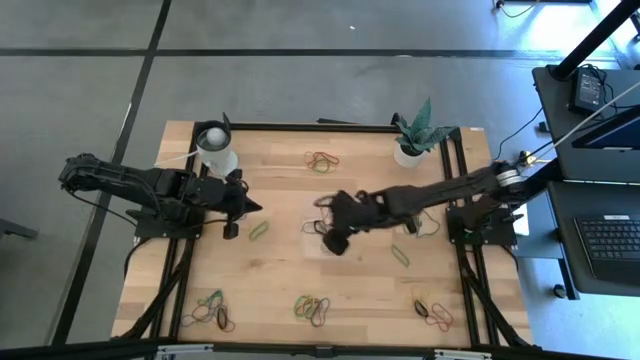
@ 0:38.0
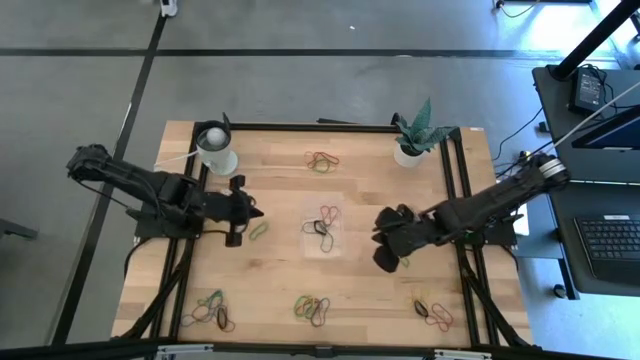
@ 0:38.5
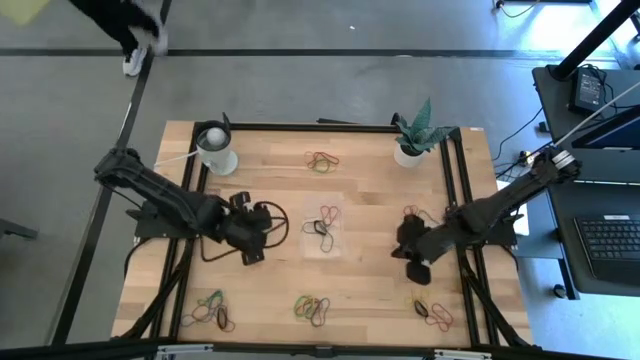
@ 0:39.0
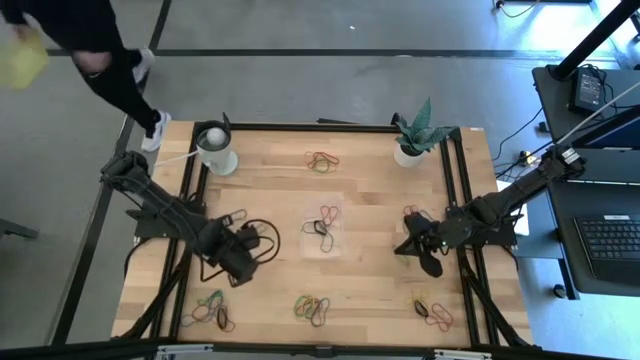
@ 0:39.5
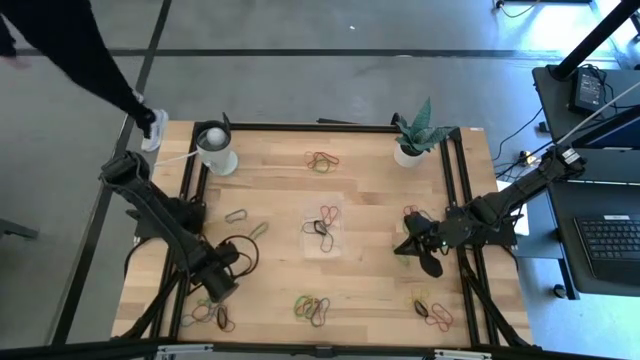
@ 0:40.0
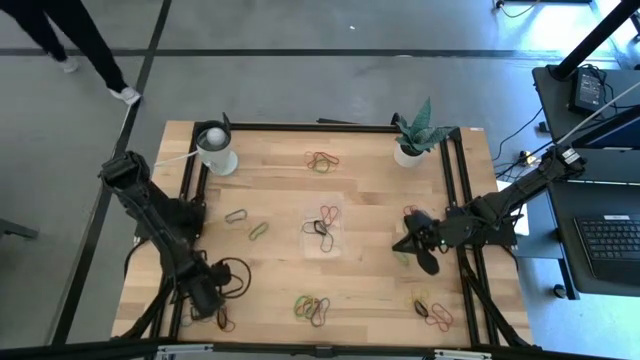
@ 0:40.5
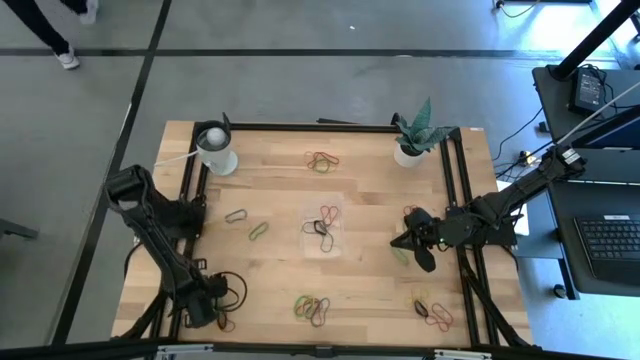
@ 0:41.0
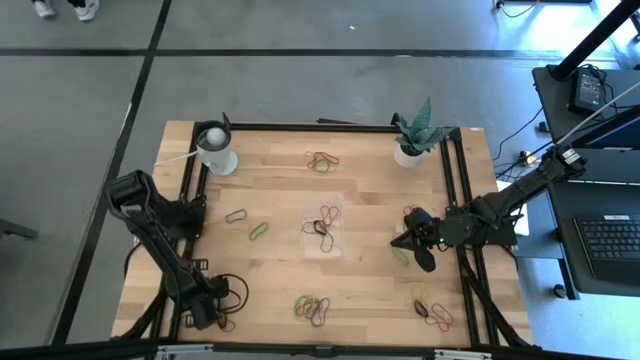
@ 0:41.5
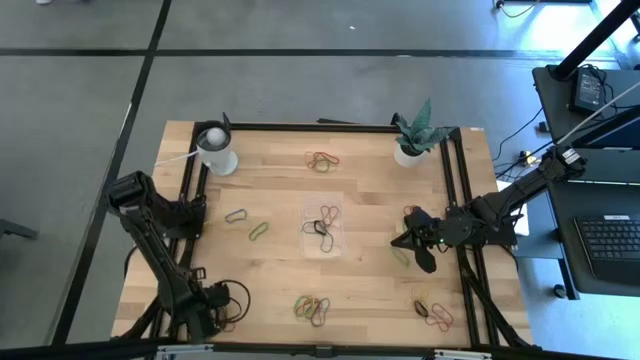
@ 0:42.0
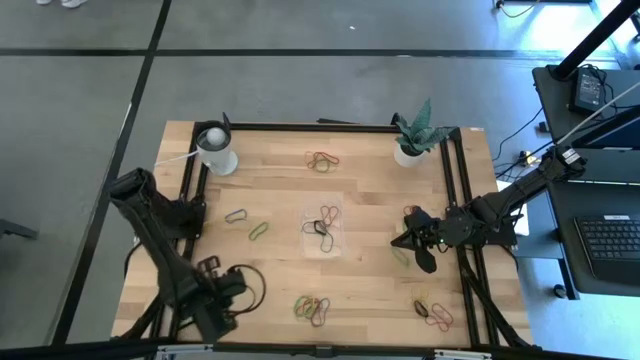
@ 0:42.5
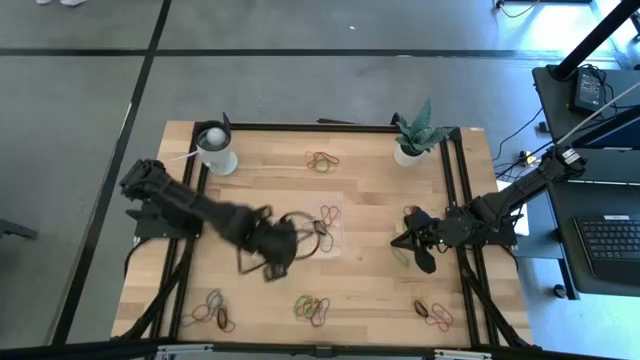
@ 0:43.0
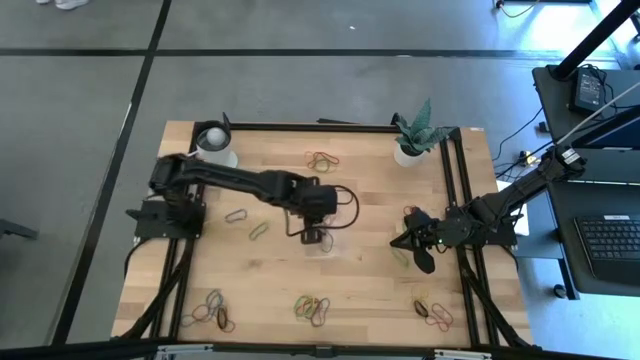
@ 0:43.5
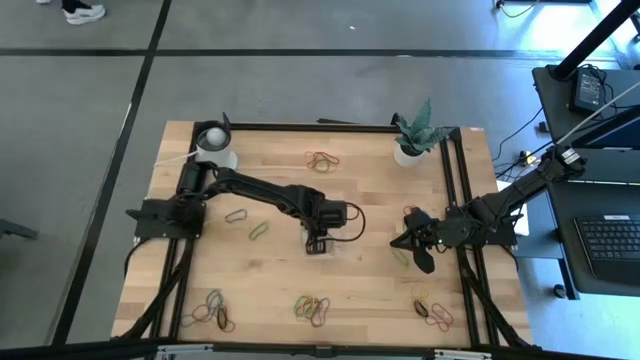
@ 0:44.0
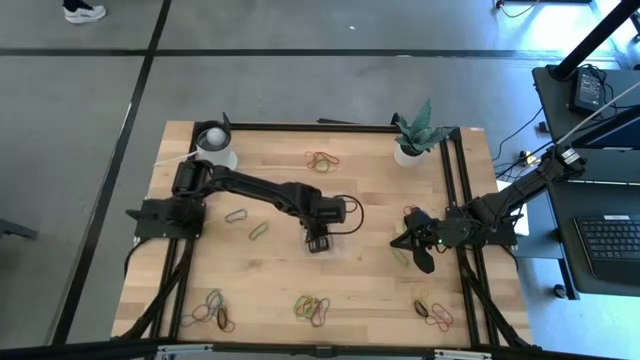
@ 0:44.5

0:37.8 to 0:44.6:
Task: Pick and place rubber bands into bin
Put the green rubber band into the transparent bin

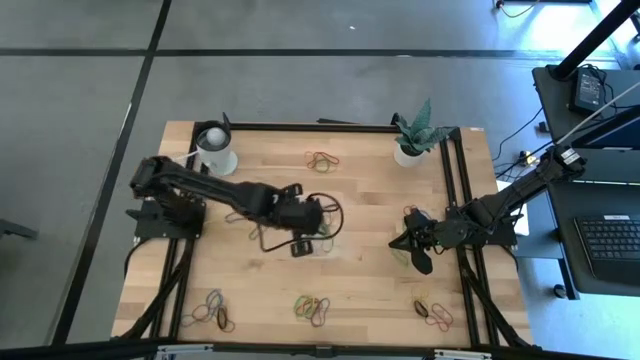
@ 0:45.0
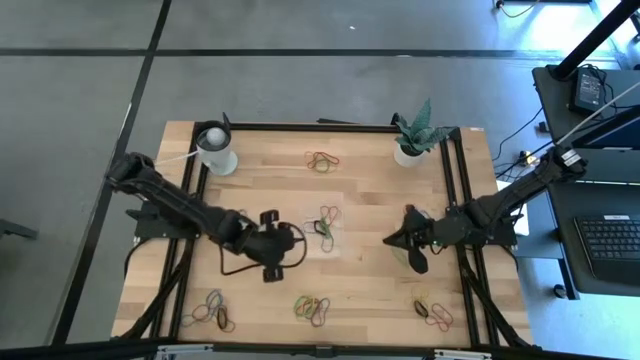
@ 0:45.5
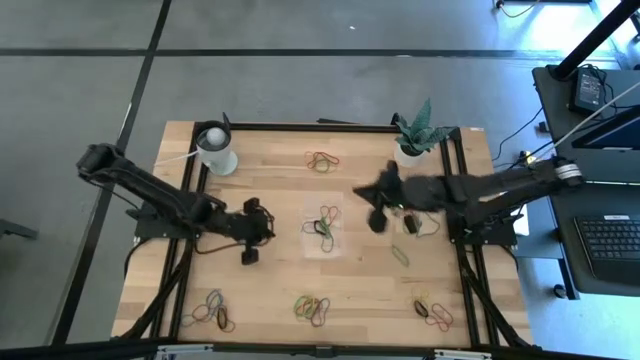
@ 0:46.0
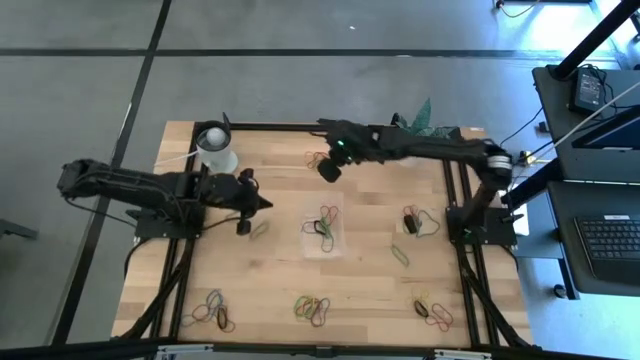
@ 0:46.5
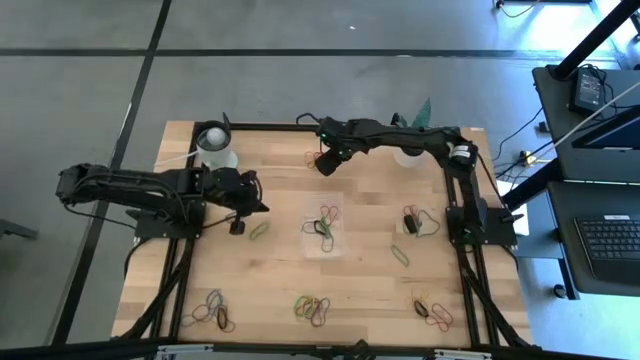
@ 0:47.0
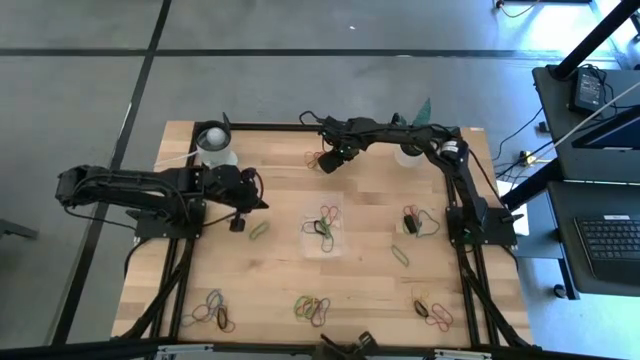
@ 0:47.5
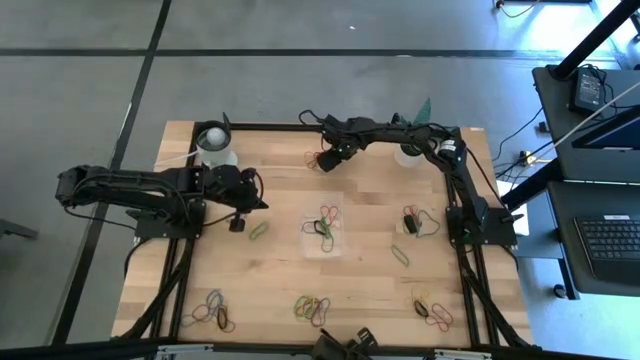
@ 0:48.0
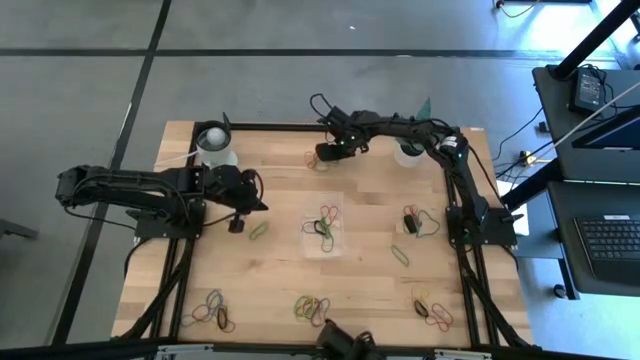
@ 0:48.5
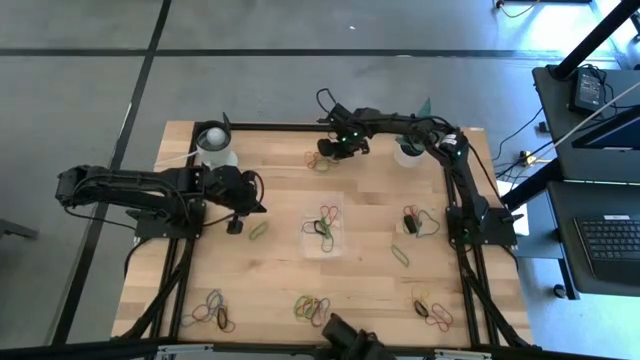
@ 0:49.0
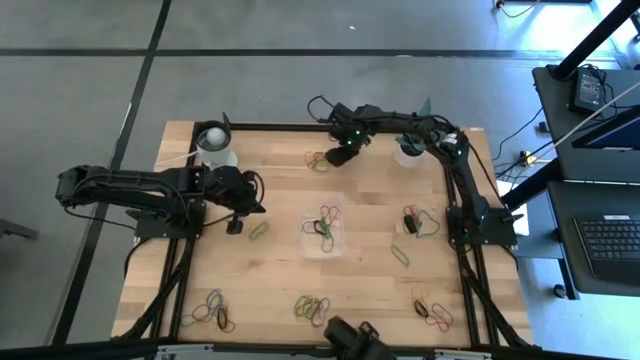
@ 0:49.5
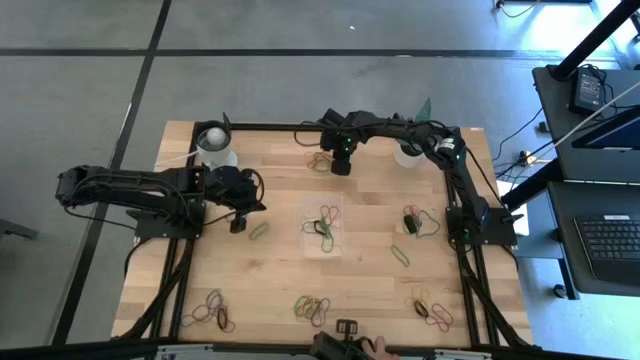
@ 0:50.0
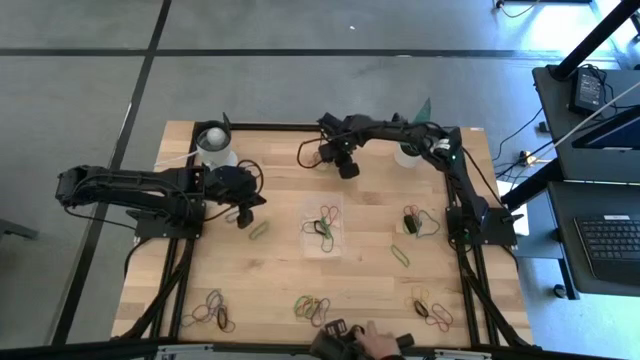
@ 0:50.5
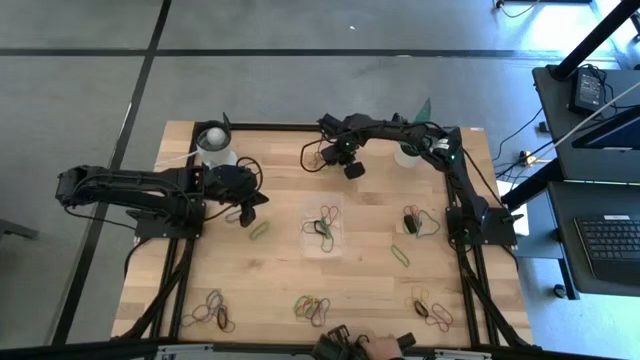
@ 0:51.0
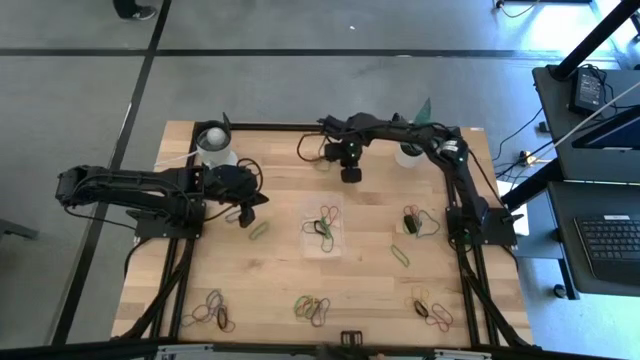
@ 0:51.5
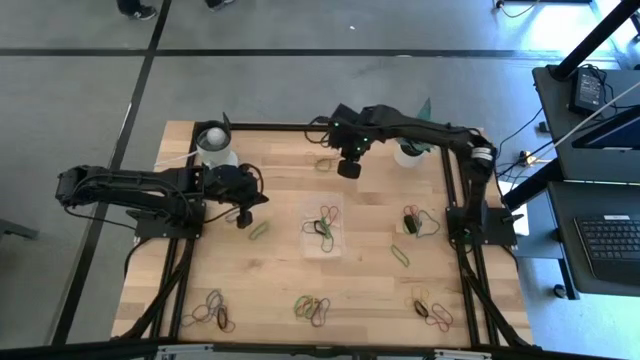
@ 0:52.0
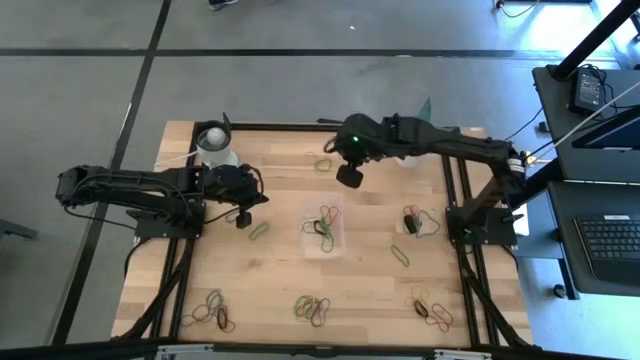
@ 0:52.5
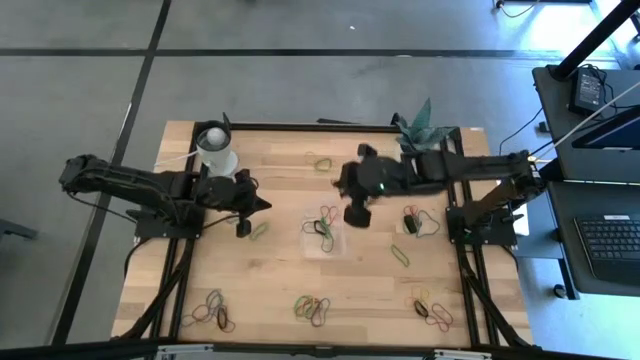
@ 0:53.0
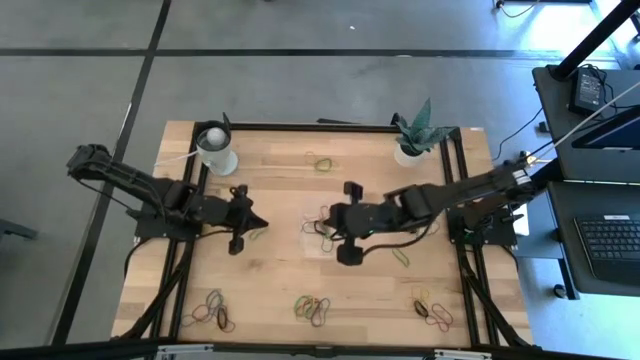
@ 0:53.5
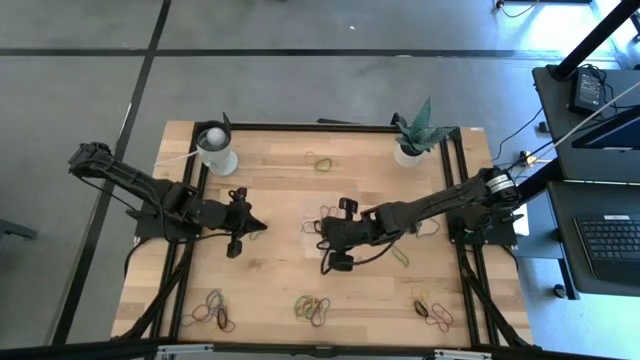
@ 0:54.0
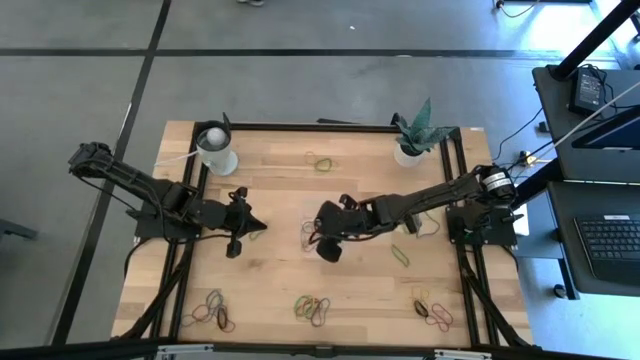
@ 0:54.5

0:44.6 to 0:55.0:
Put the red rubber band into the transparent bin

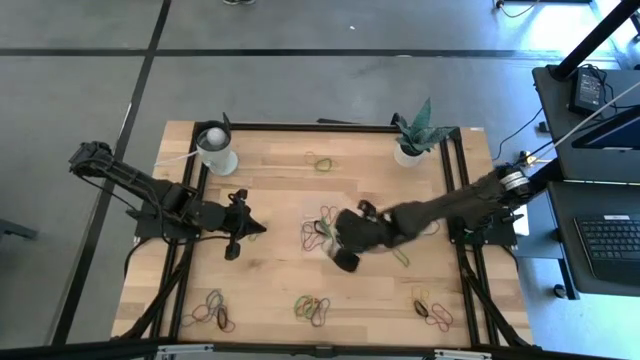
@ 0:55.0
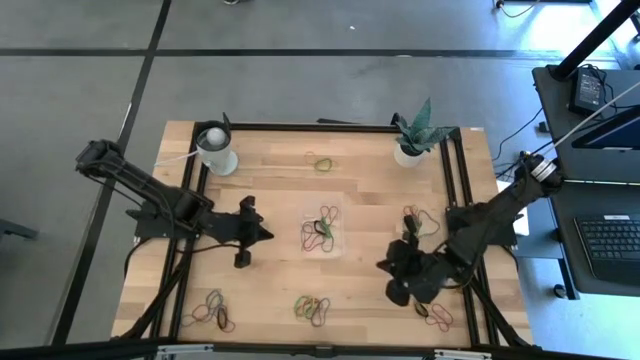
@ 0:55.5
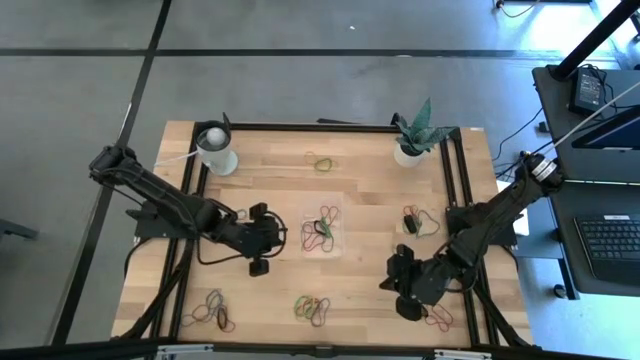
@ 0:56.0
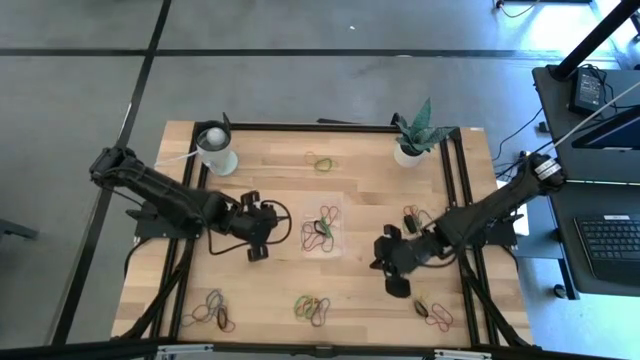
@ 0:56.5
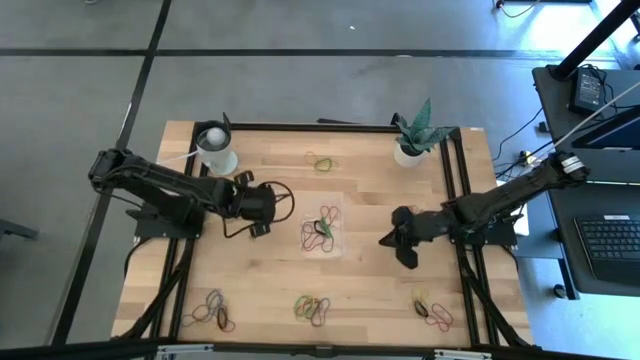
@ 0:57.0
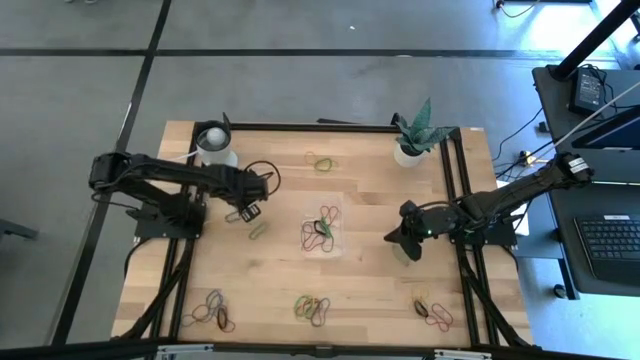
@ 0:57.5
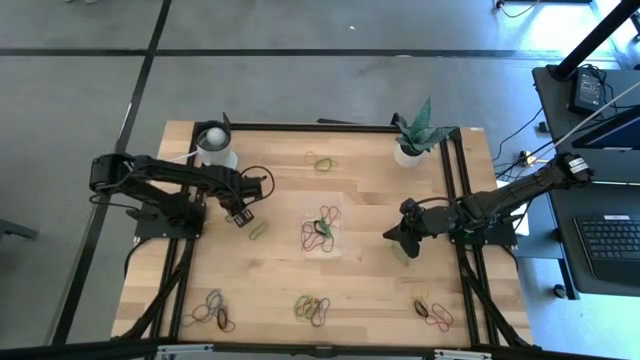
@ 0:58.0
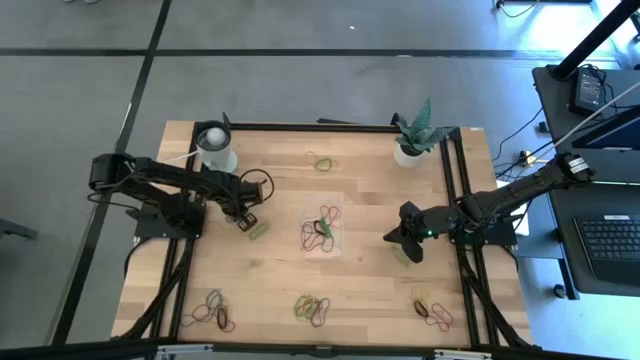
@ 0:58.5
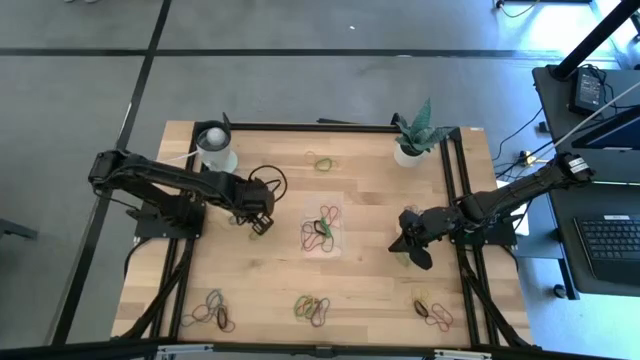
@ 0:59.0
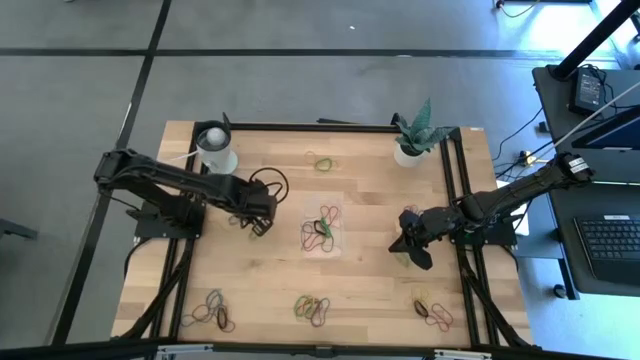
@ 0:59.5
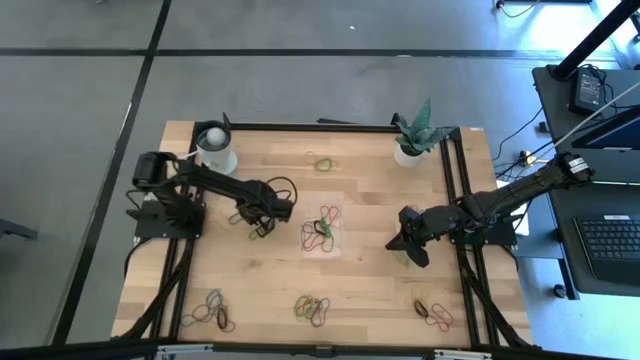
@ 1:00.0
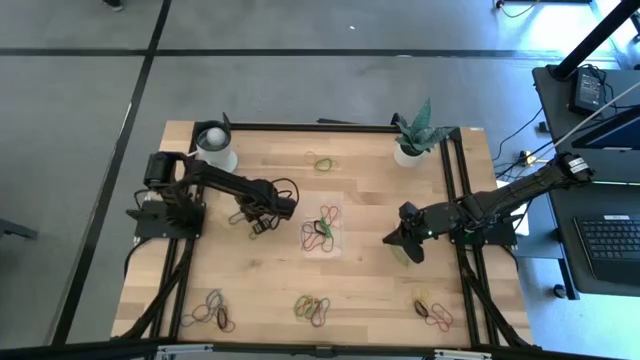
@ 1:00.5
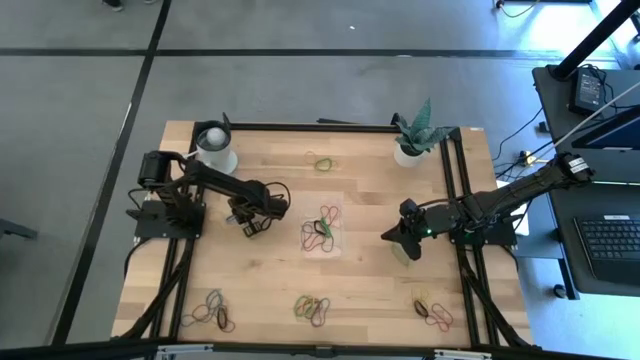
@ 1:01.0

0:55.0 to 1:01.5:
Put the blue rubber band into the transparent bin
